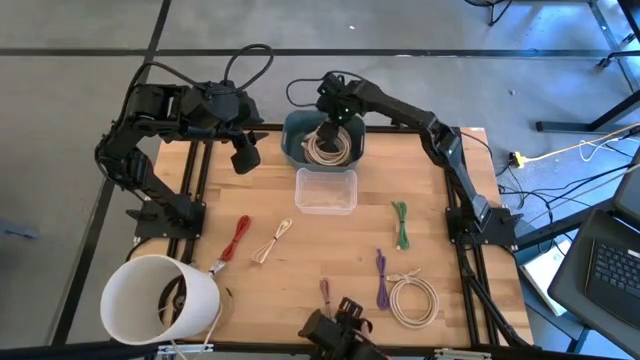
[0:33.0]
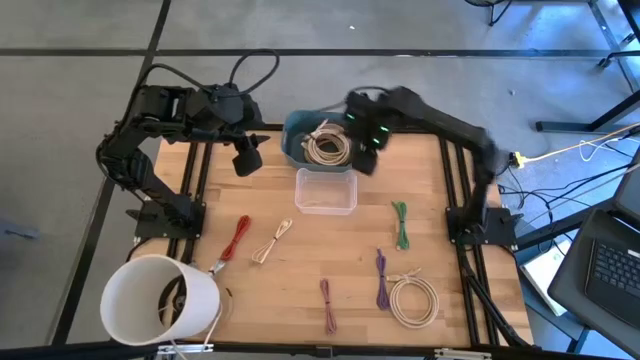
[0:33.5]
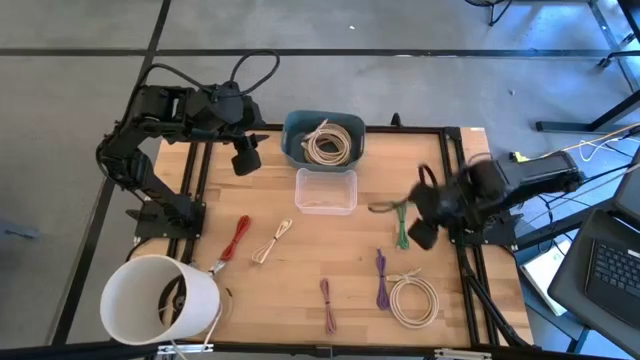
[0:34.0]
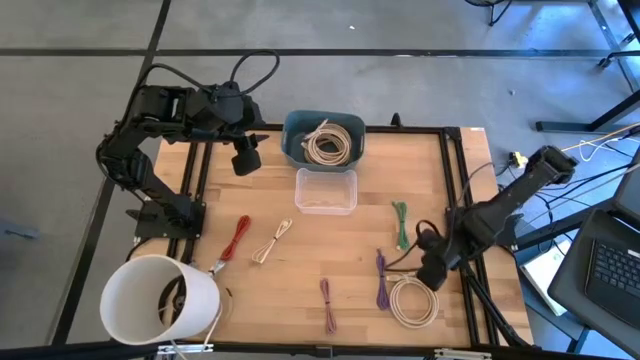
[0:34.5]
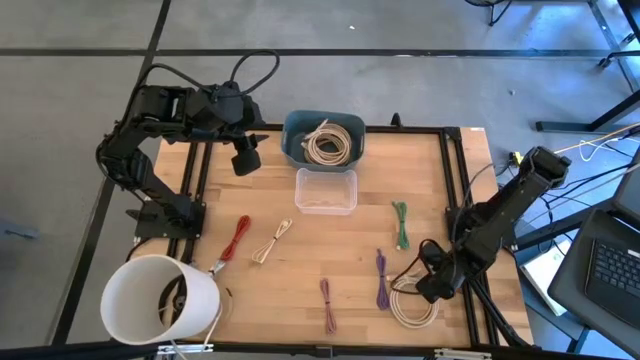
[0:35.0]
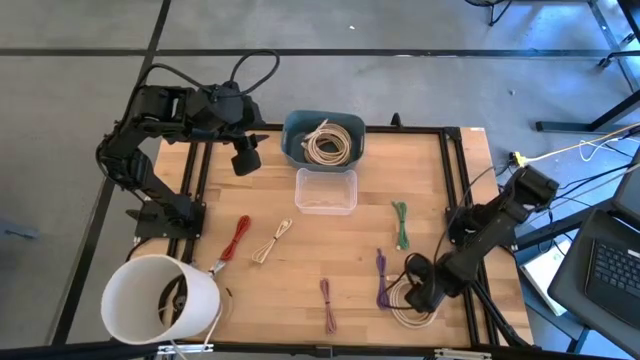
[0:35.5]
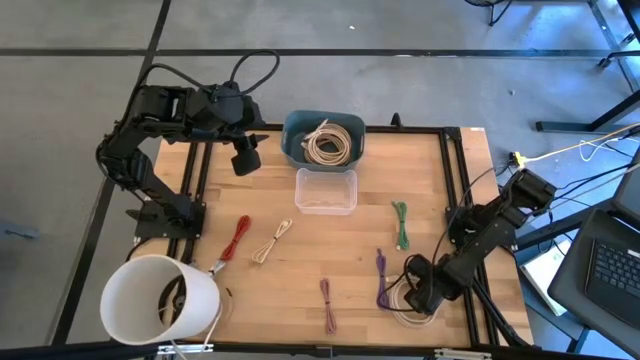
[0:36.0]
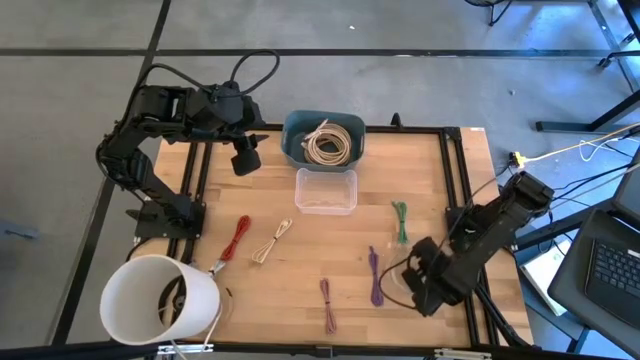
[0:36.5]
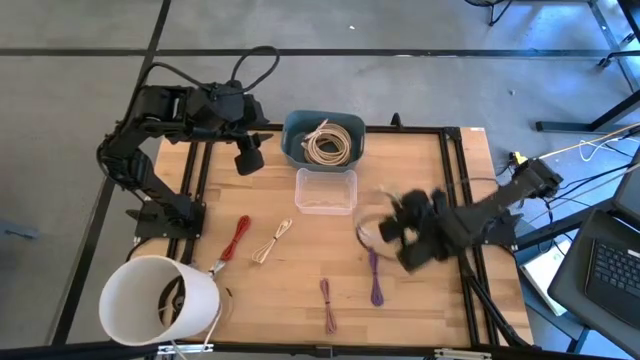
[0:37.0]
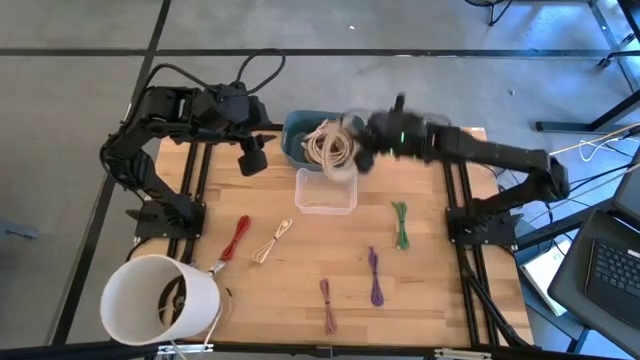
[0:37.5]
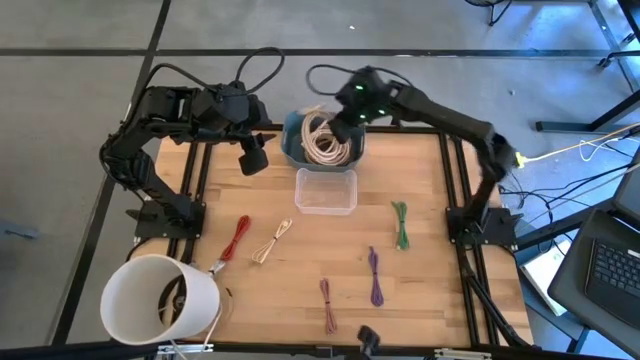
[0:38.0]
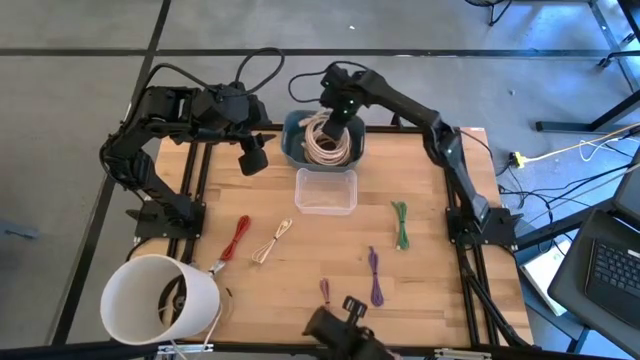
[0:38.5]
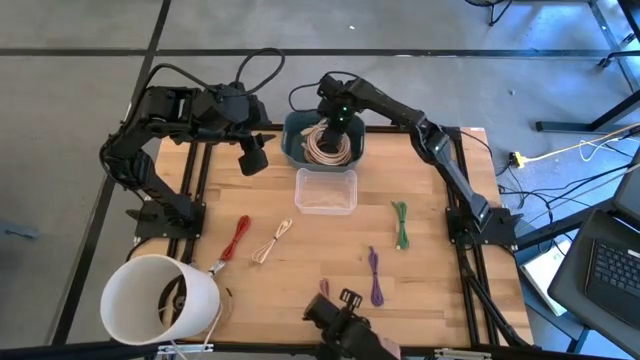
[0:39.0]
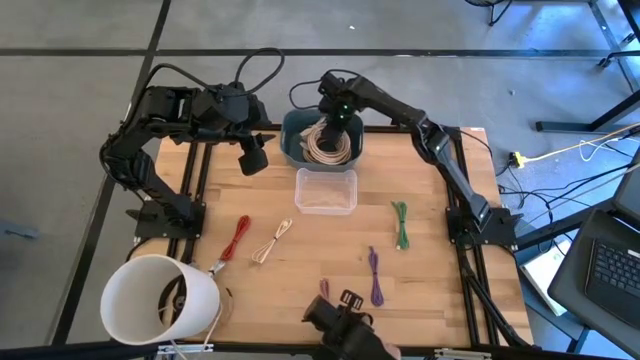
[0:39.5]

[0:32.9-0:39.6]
Put the brown HDMI cable into the blue bin

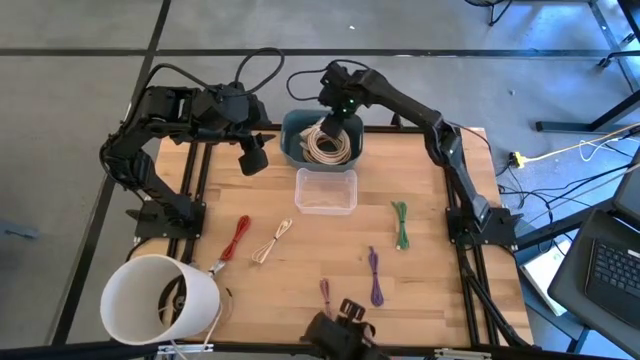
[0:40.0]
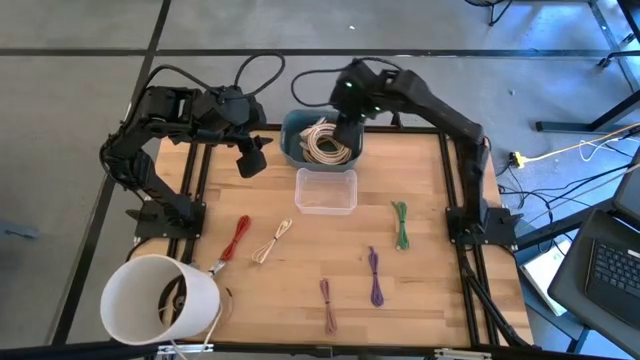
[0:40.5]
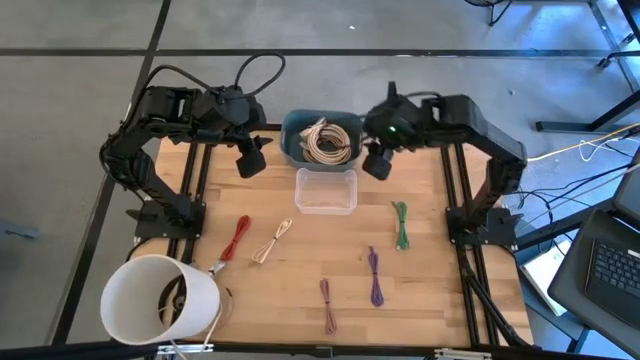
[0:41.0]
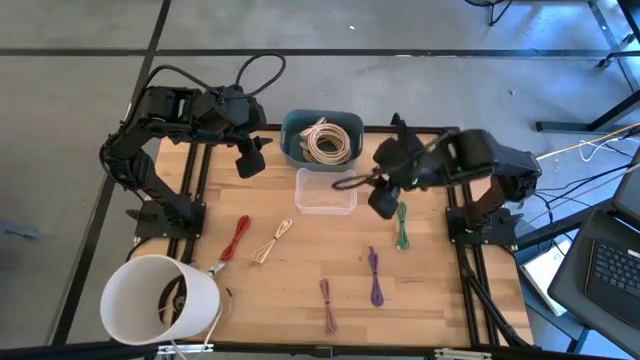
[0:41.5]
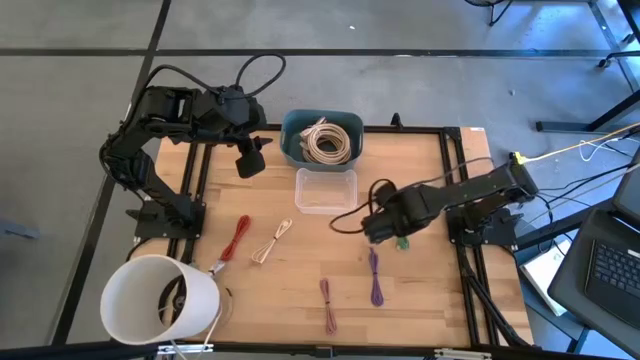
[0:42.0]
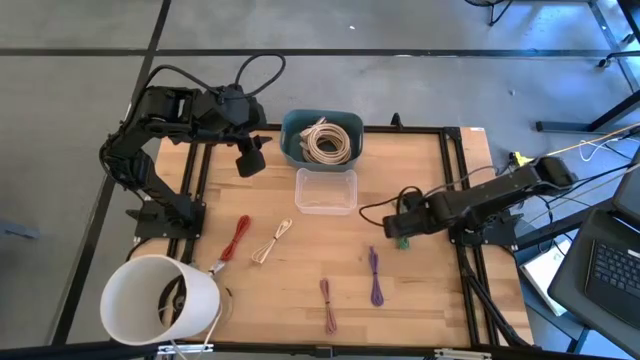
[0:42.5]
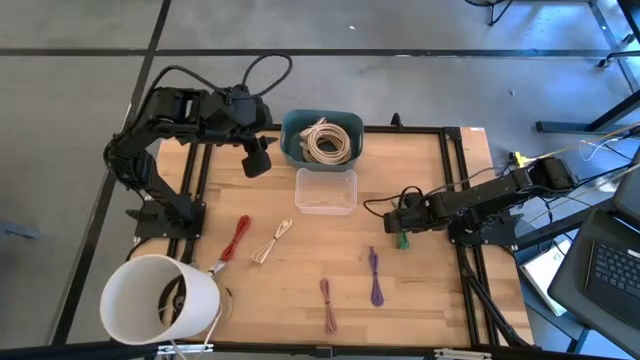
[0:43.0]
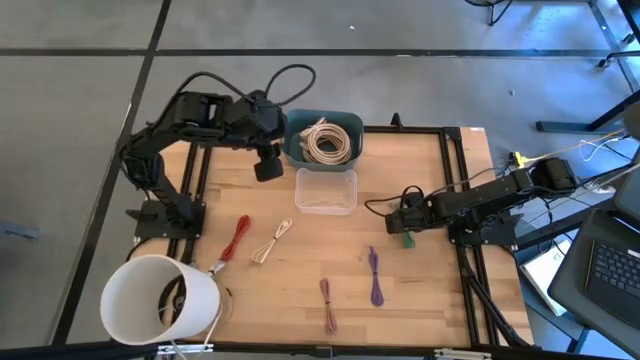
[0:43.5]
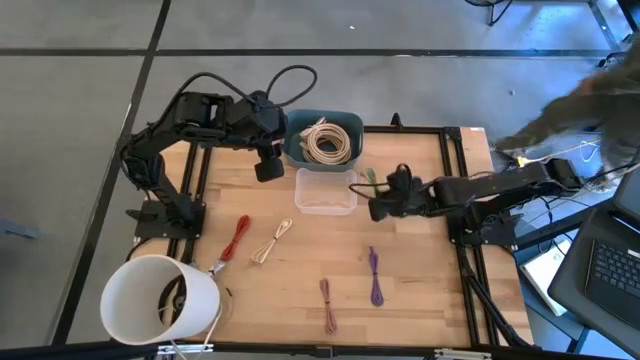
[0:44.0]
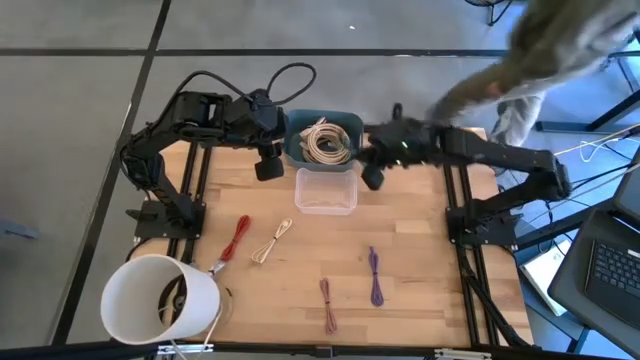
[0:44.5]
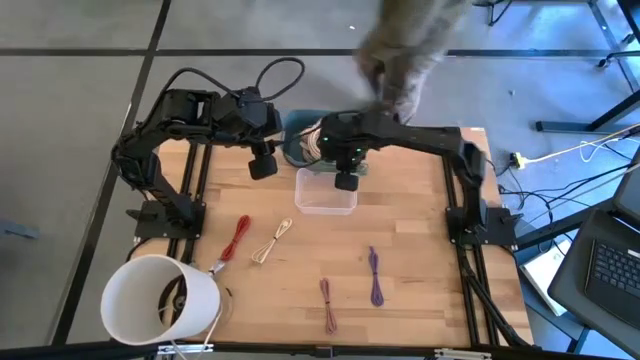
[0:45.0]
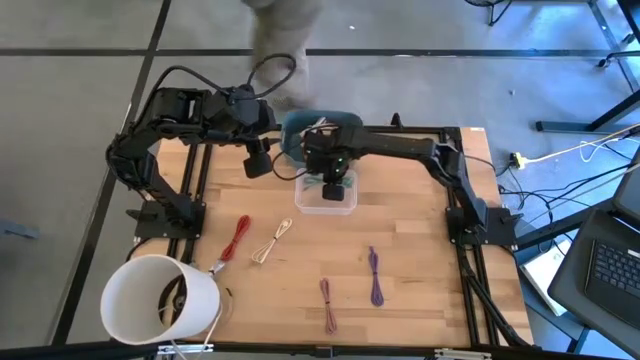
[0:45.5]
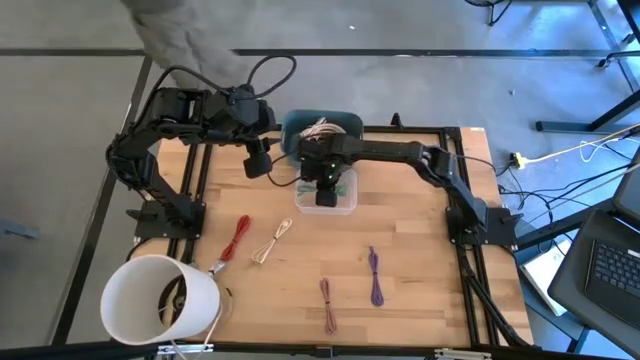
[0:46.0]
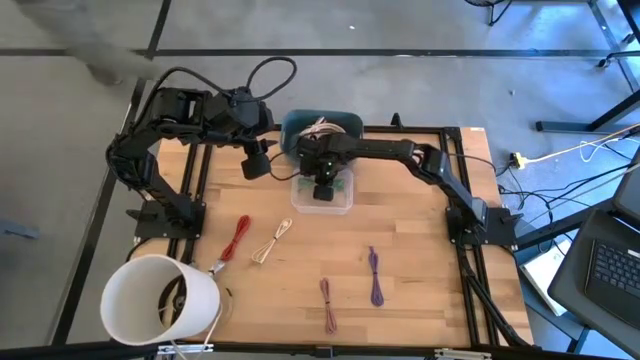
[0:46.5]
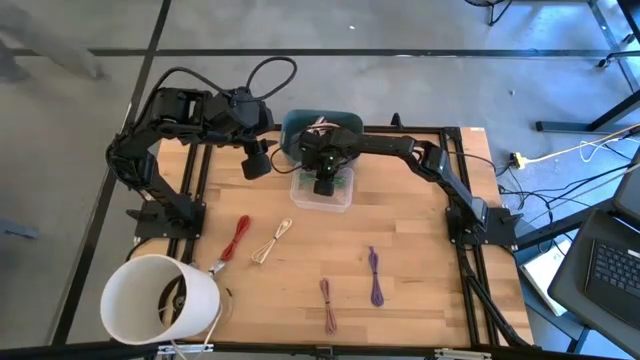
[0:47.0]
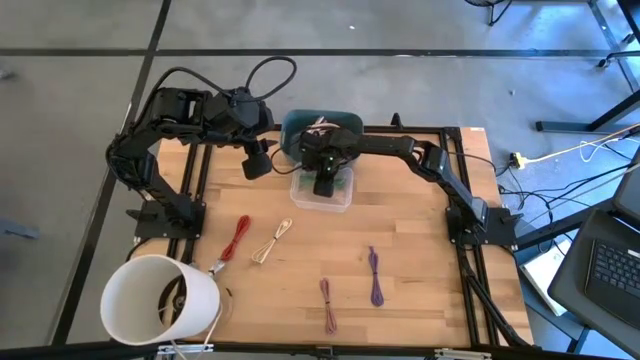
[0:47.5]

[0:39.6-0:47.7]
Put the green charger cable into the transparent bin

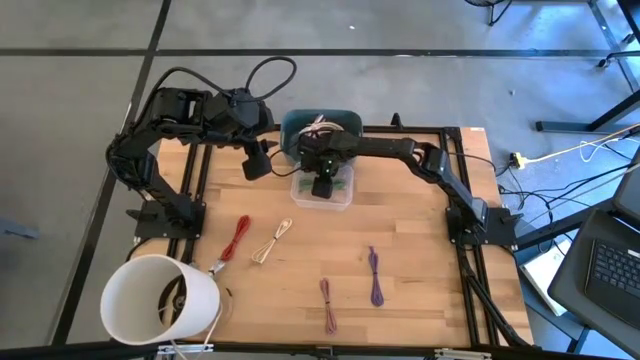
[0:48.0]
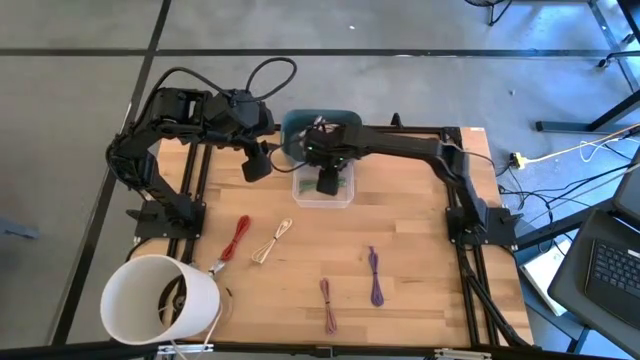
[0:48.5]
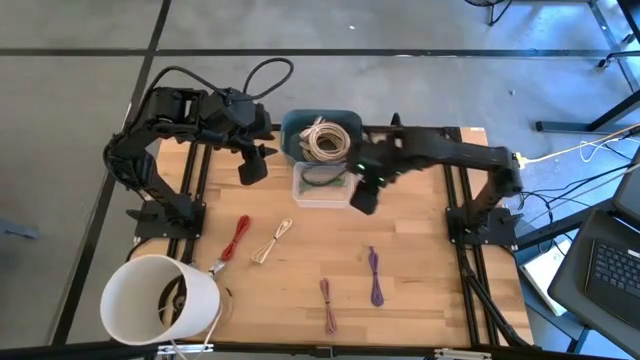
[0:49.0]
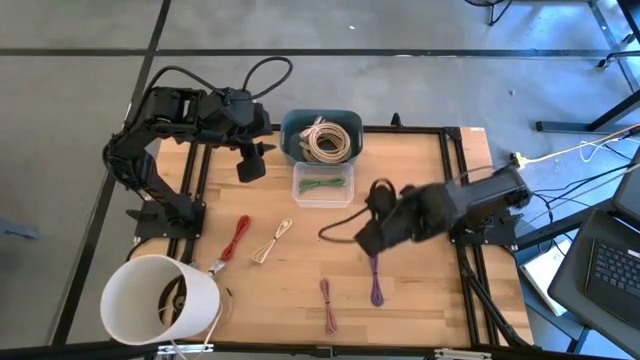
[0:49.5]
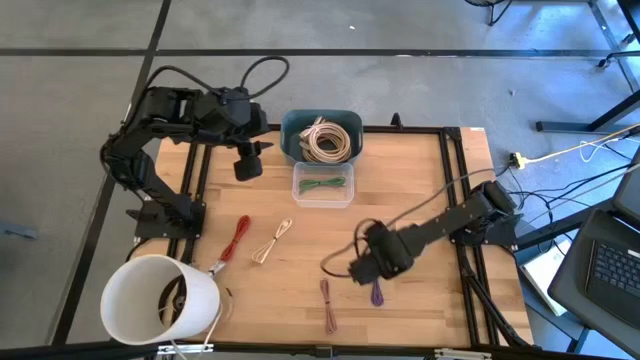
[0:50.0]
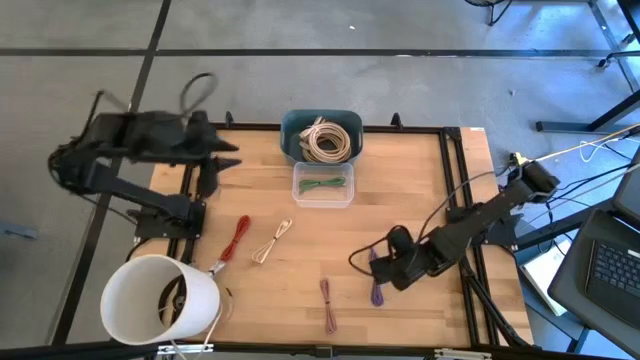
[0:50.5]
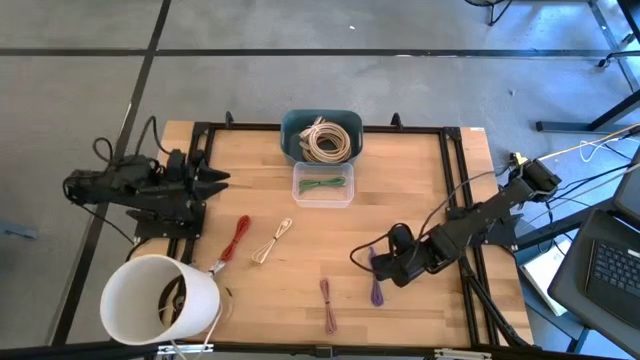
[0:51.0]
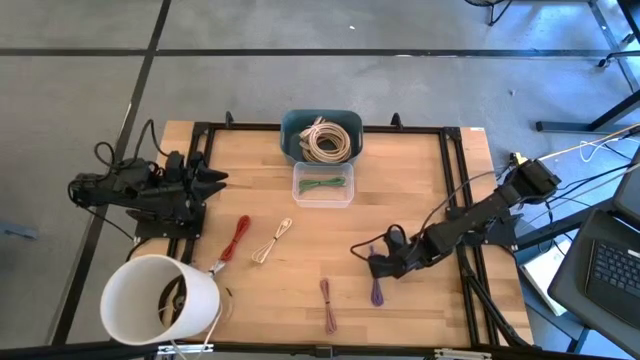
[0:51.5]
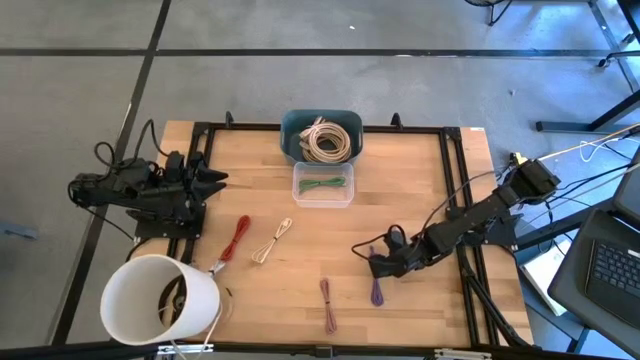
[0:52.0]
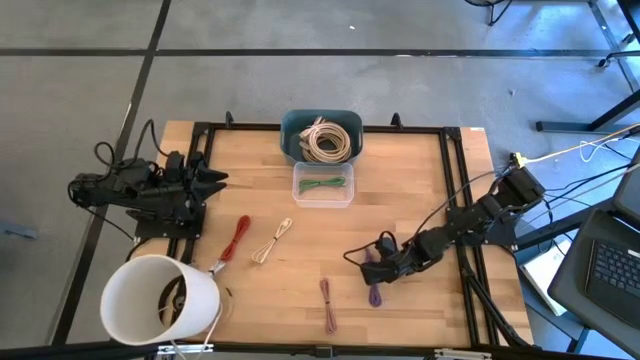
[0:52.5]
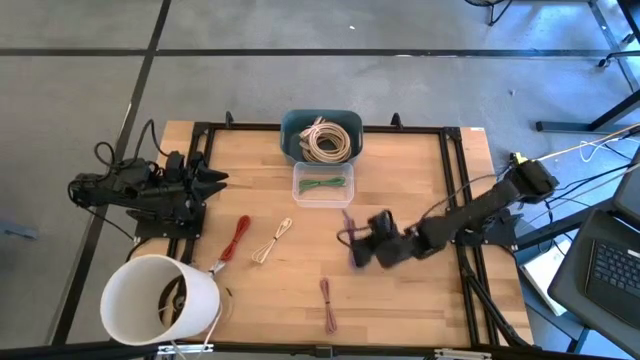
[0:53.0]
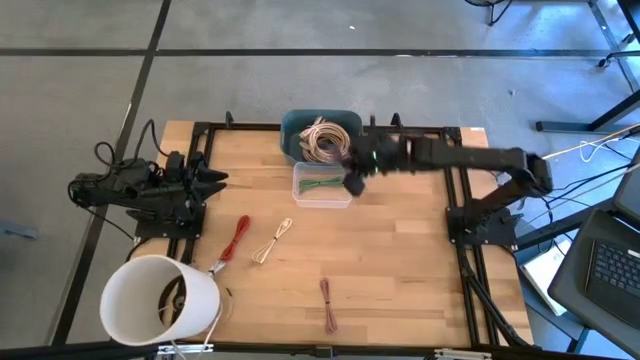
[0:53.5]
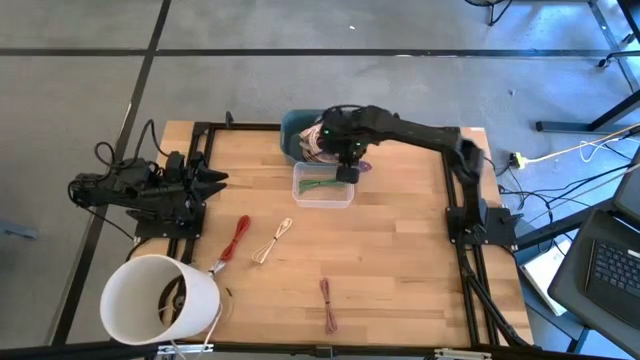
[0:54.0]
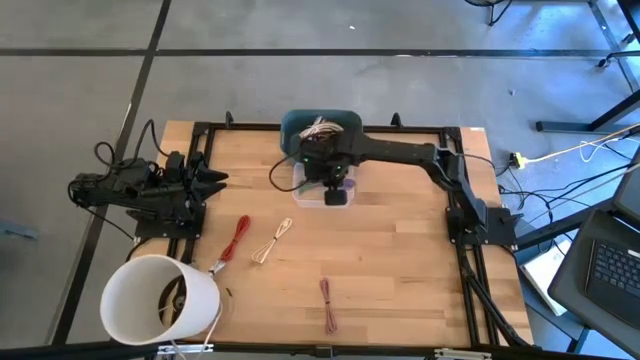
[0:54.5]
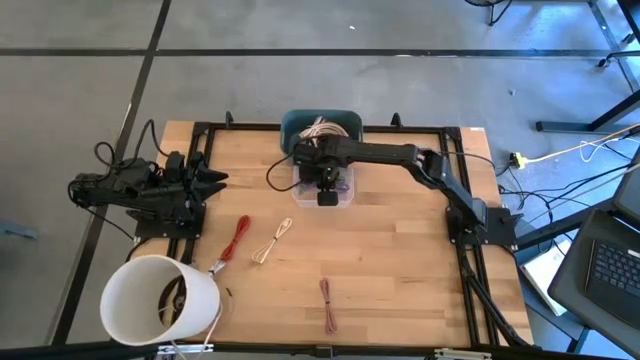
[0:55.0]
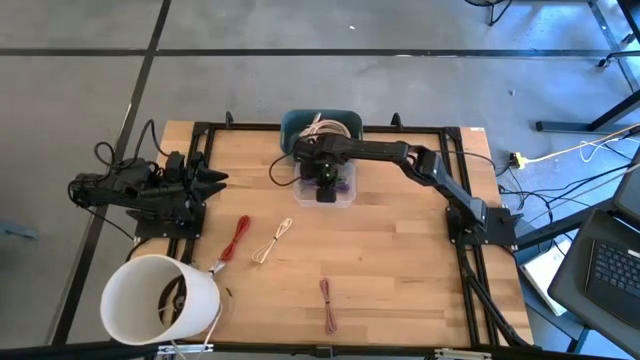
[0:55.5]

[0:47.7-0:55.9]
Put the purple charger cable into the transparent bin
